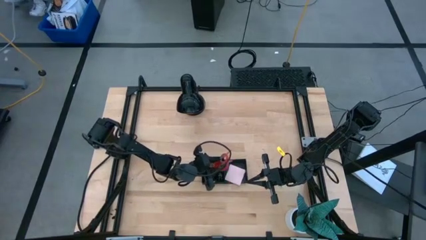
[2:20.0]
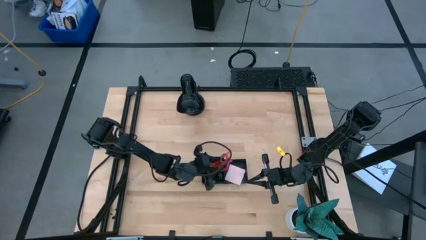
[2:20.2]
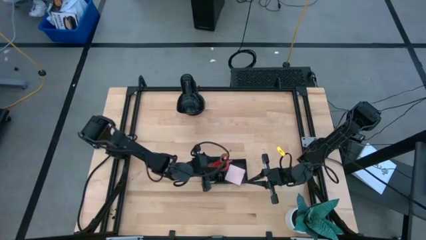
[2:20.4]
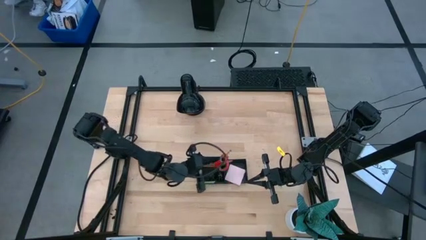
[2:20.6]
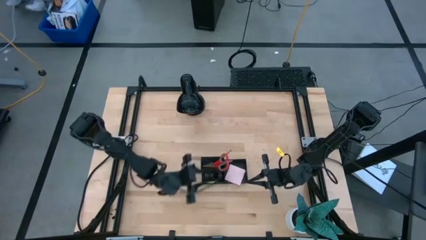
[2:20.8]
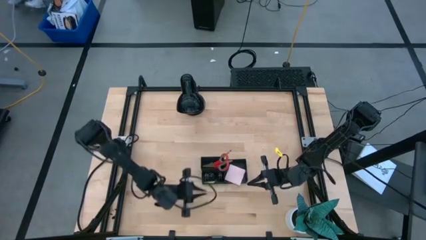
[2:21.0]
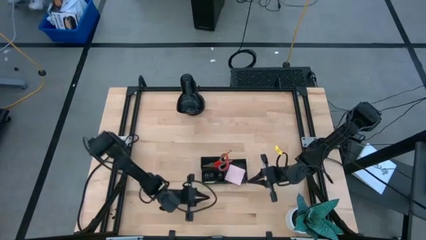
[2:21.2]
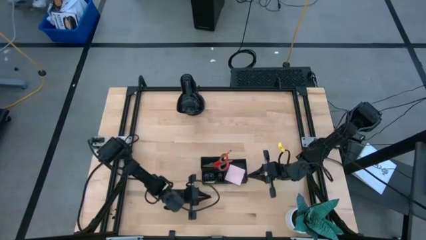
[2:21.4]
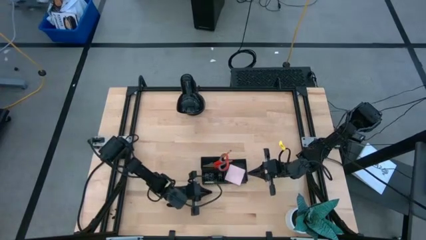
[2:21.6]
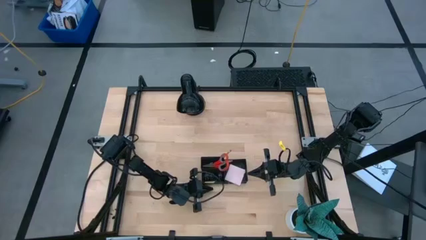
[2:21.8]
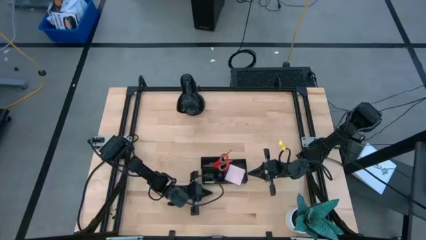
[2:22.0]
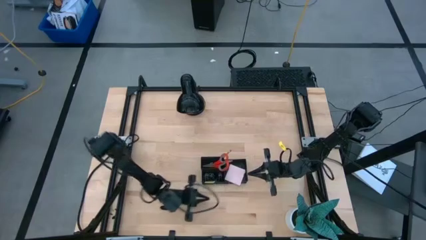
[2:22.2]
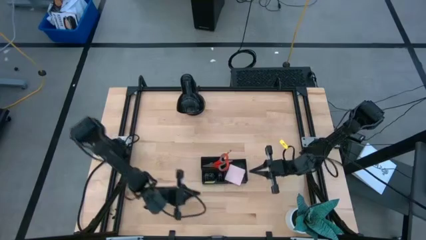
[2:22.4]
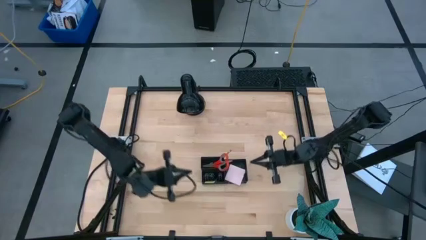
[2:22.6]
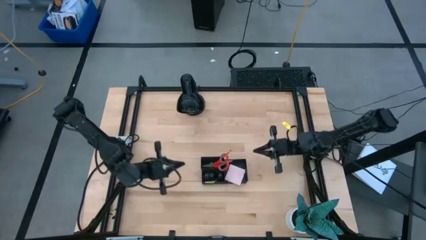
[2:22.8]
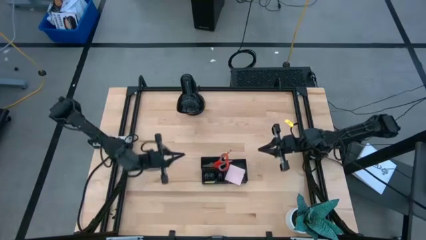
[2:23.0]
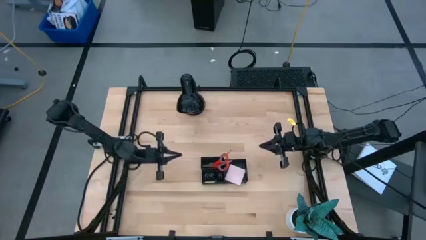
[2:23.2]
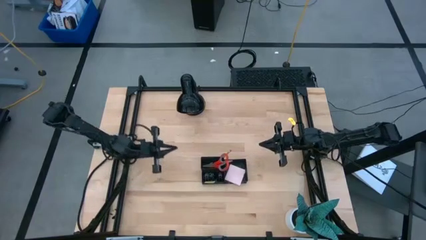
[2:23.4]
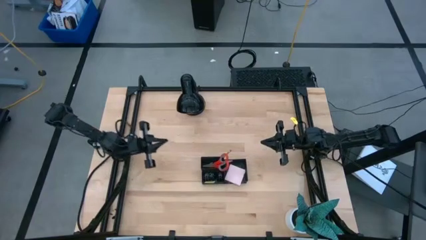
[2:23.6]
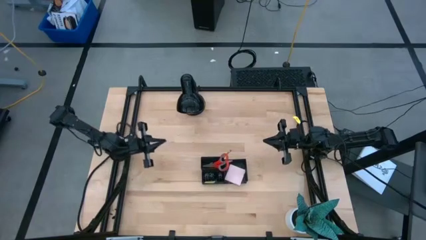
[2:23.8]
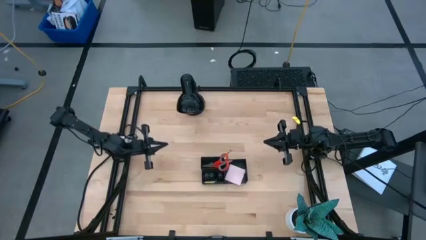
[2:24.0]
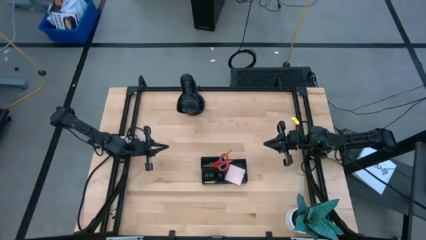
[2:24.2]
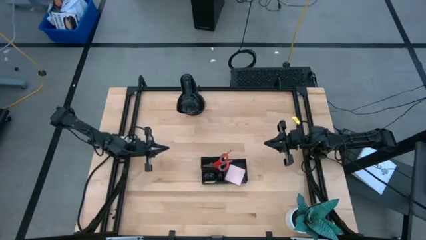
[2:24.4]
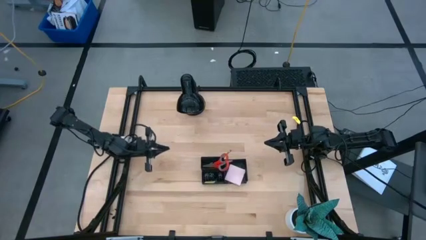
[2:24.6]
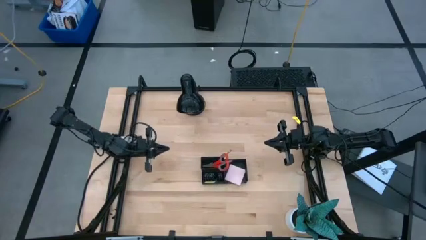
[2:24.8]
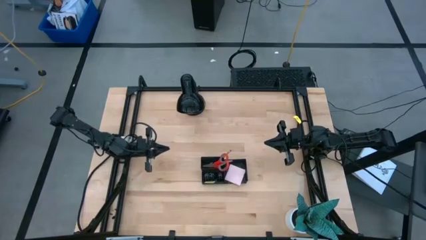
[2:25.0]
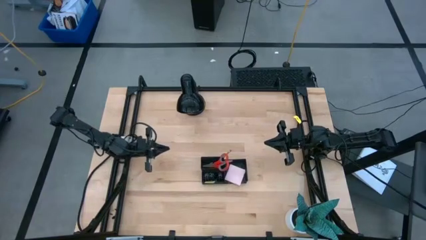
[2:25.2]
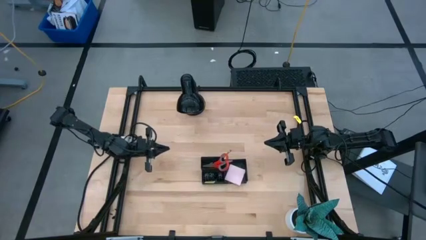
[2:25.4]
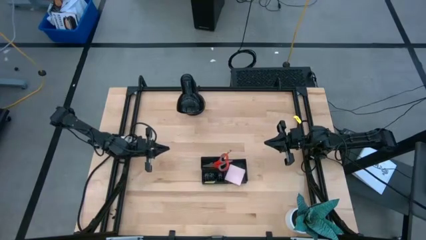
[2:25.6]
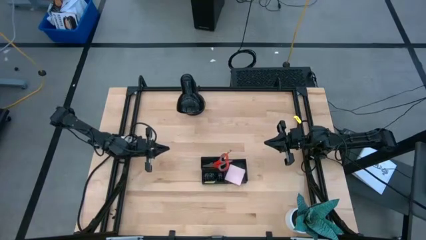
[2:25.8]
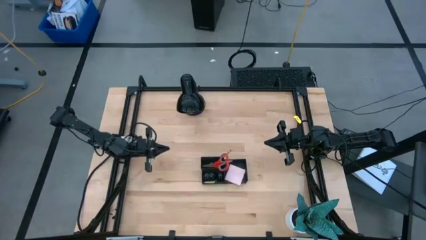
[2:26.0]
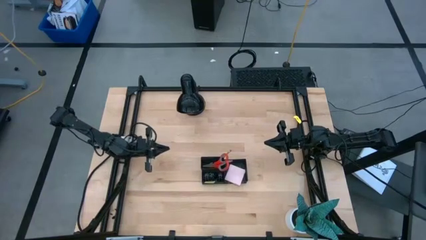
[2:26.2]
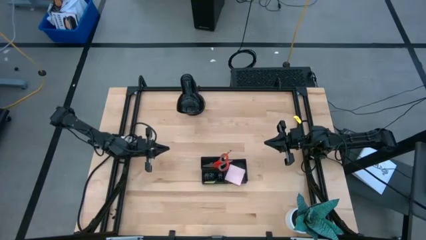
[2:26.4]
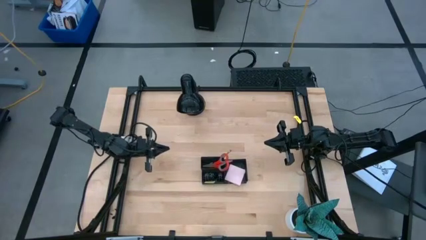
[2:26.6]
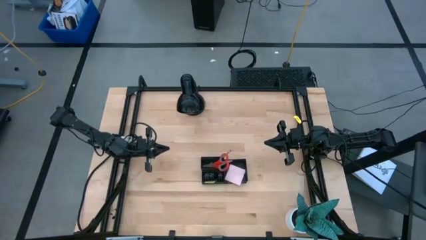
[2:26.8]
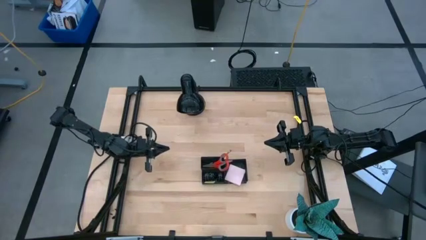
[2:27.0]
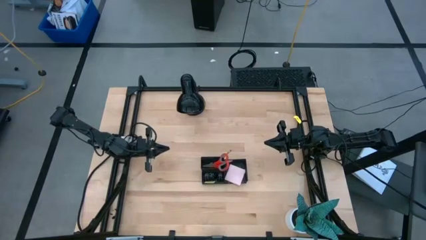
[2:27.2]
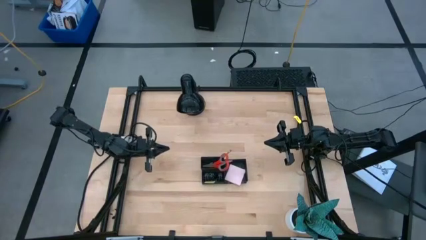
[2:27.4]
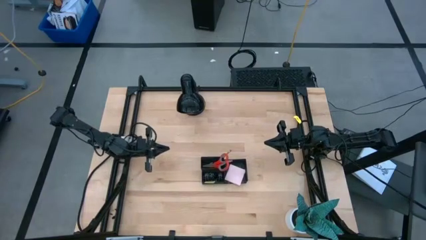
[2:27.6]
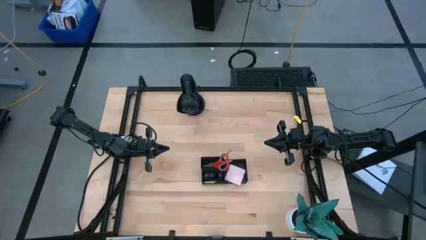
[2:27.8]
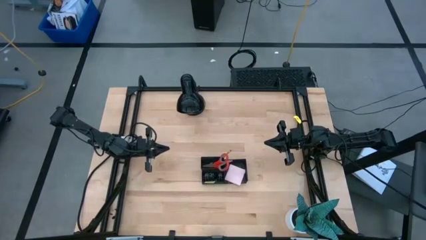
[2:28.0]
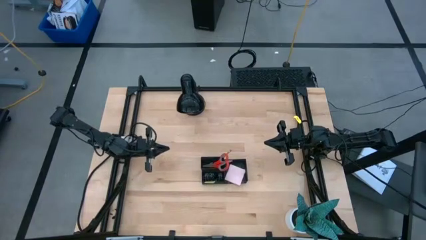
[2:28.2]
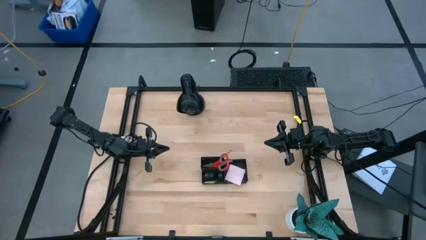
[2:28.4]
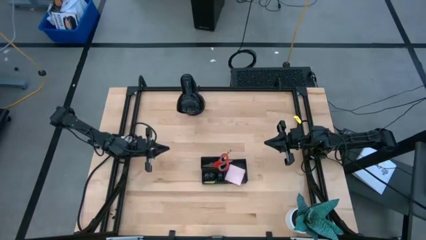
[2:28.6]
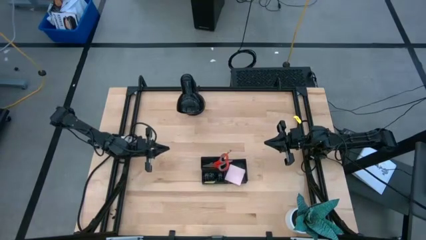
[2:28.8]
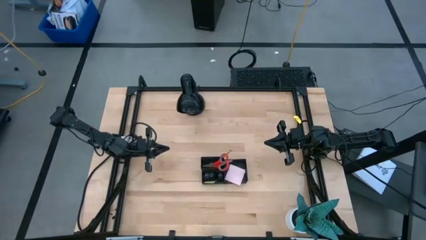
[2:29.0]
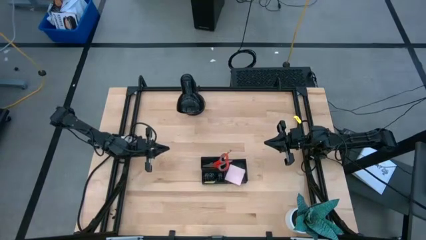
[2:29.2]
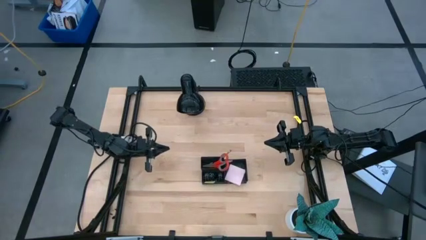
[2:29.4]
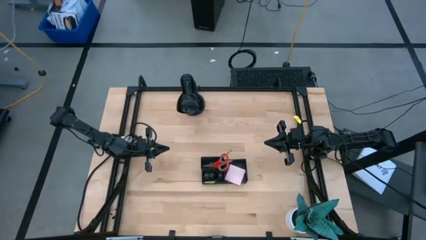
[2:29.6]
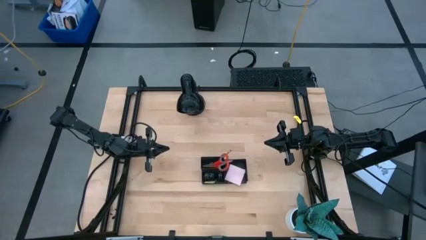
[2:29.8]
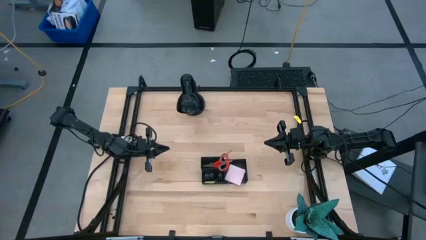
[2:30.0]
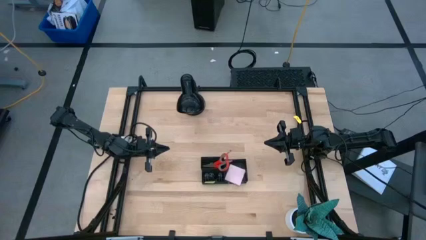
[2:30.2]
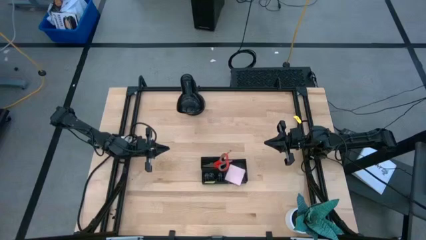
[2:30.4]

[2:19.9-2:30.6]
Task: Pick and place office supplies into organizer
Return to Home Position

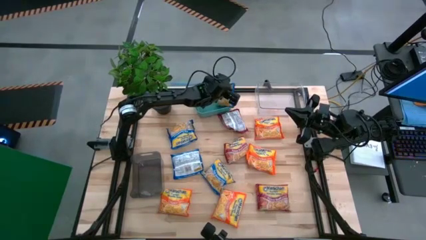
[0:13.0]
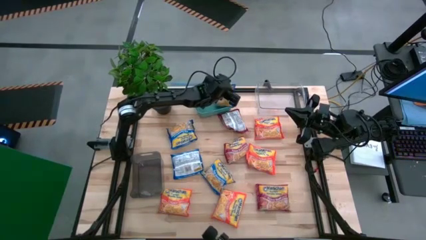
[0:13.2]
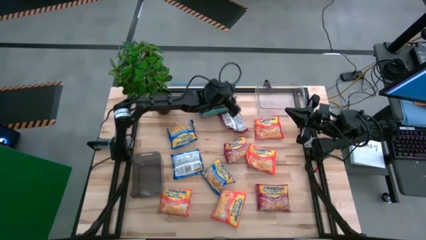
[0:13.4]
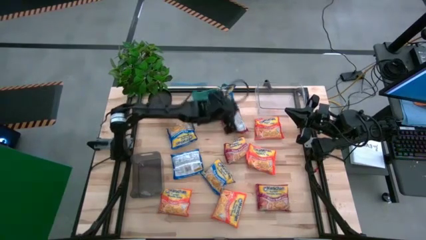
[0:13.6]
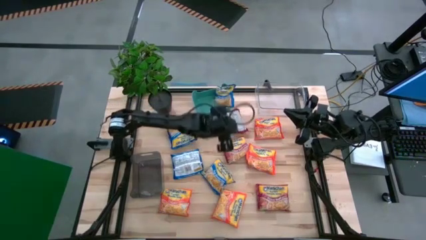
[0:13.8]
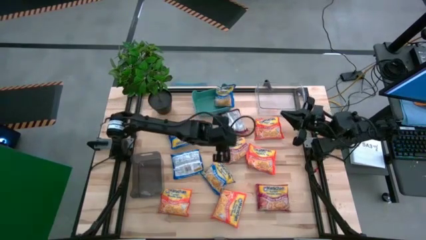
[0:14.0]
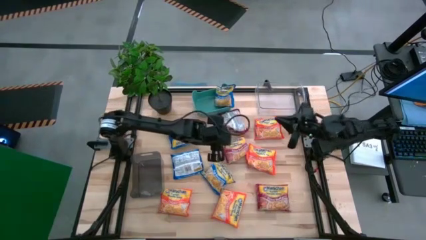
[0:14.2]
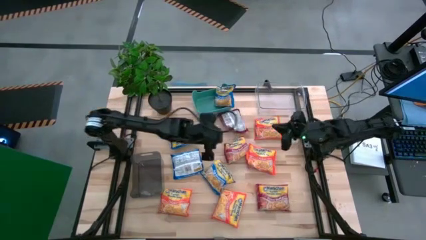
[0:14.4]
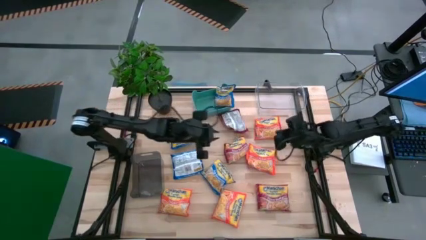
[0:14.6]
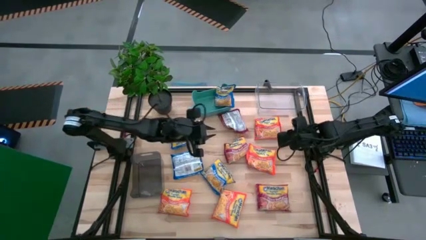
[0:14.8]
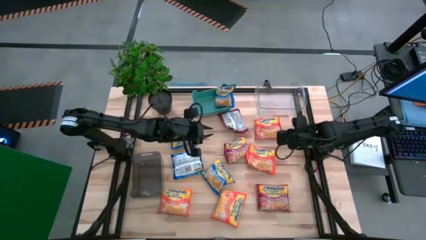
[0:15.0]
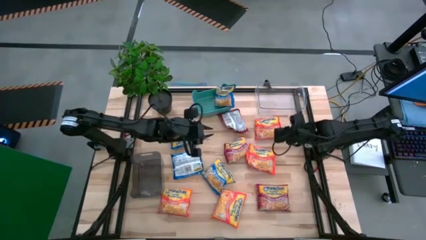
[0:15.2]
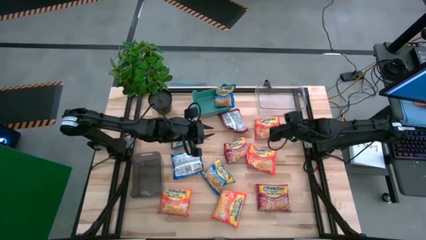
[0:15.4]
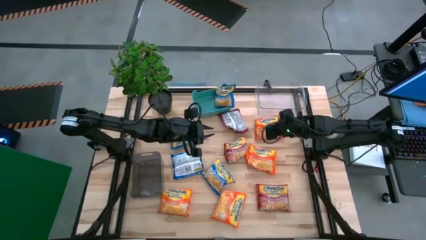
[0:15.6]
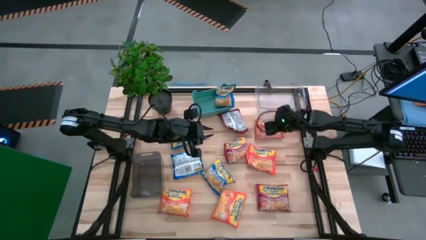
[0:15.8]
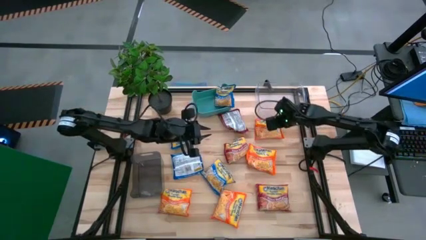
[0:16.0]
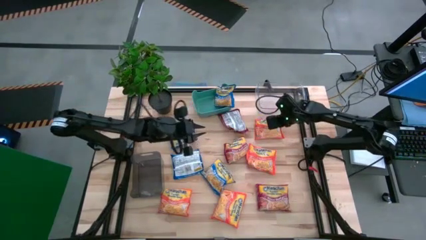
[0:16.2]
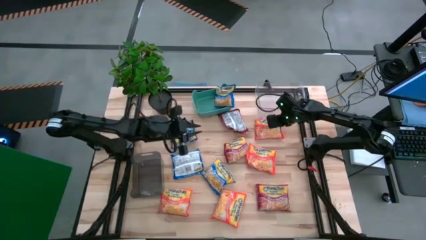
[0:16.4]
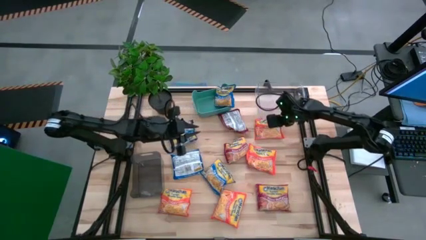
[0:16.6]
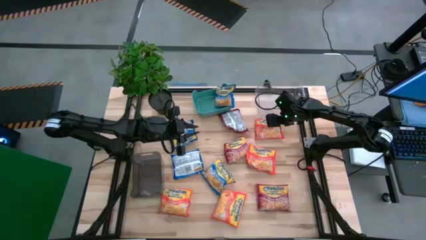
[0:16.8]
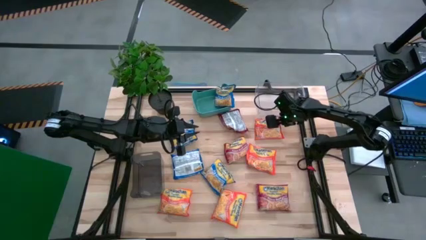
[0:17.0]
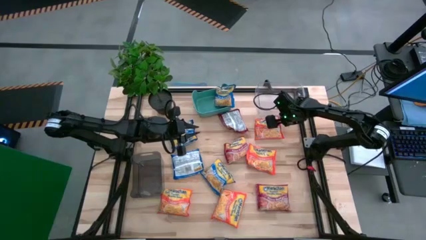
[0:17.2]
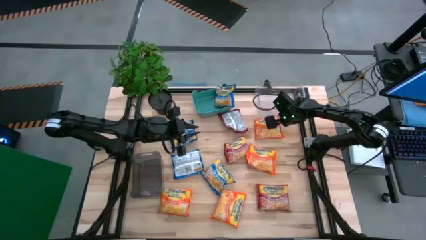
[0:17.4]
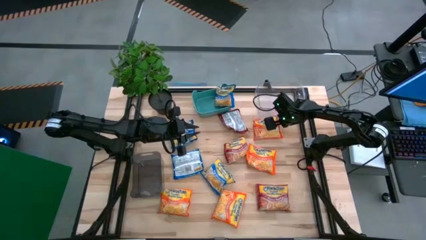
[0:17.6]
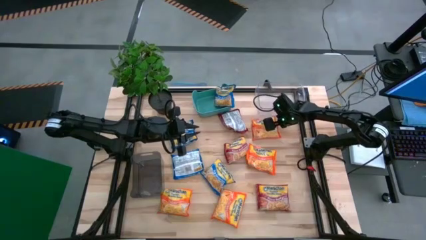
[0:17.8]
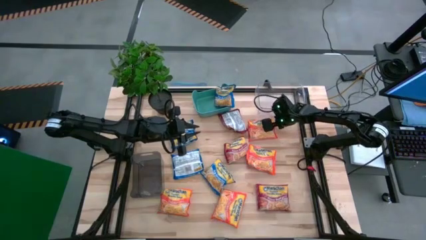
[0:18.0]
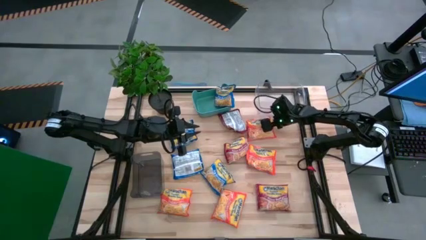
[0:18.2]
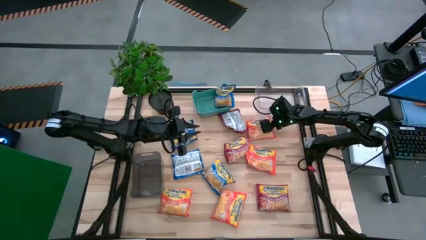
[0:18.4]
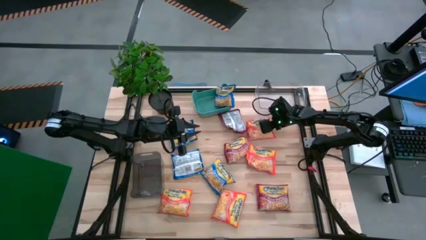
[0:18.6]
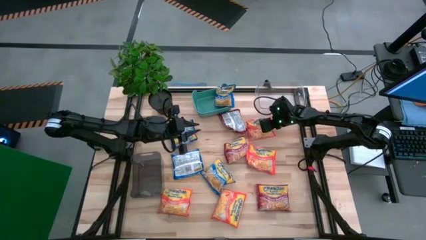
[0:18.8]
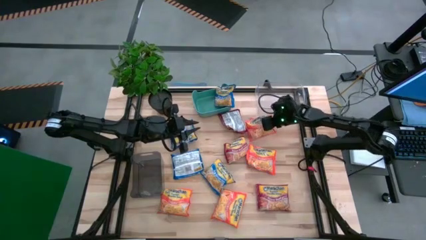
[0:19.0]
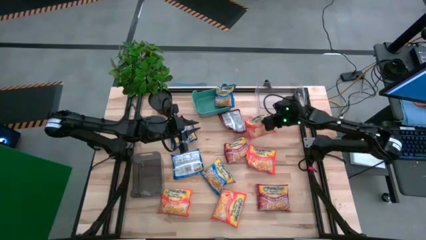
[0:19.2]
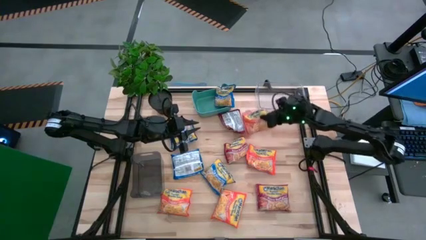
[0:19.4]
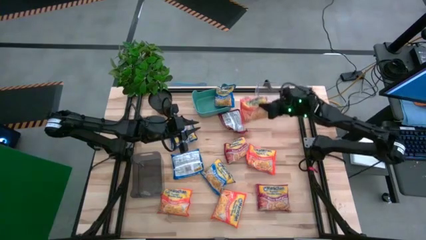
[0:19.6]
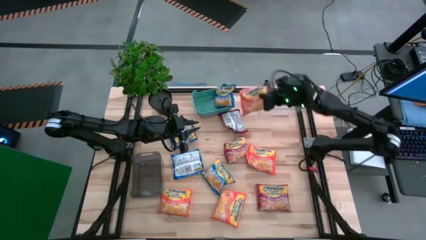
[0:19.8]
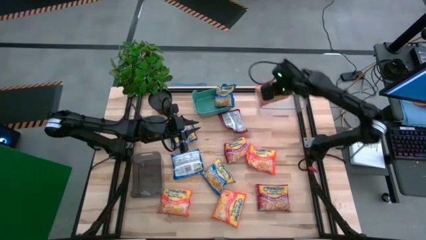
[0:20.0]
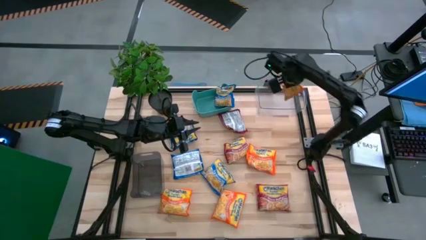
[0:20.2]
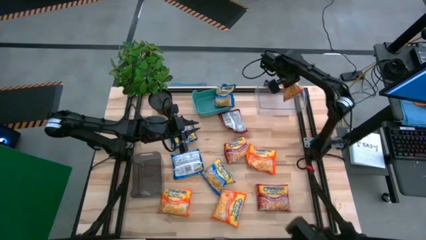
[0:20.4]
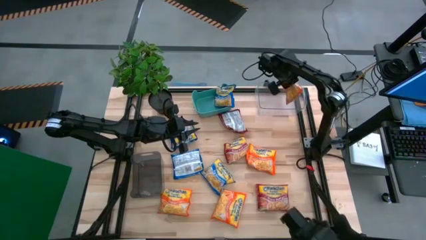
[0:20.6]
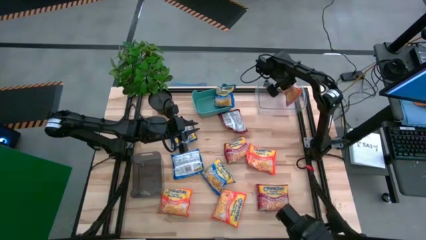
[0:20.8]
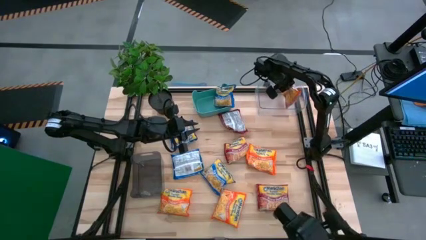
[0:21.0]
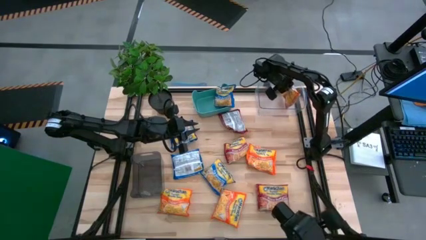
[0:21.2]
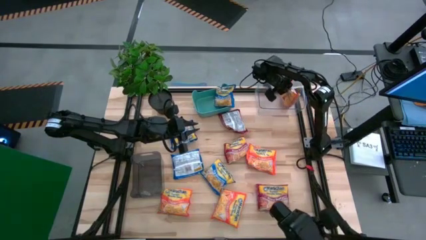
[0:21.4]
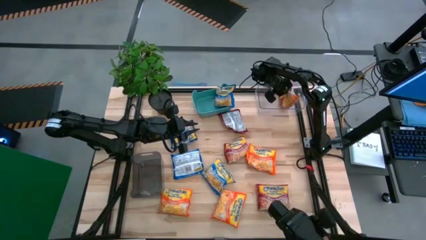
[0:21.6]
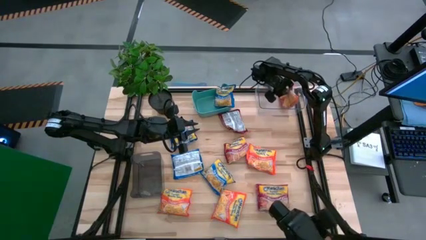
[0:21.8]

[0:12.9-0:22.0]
Task: Sort Maruchan noodles
Put the top orange noodle pack into the transparent bin
